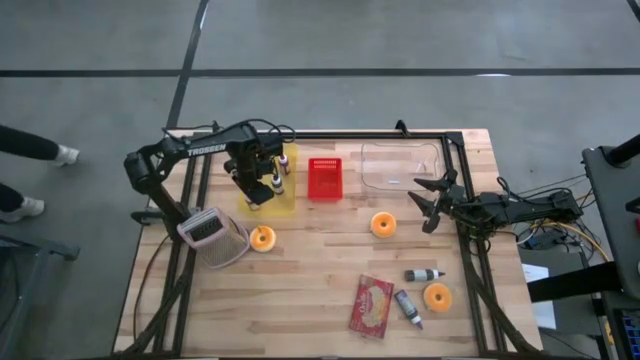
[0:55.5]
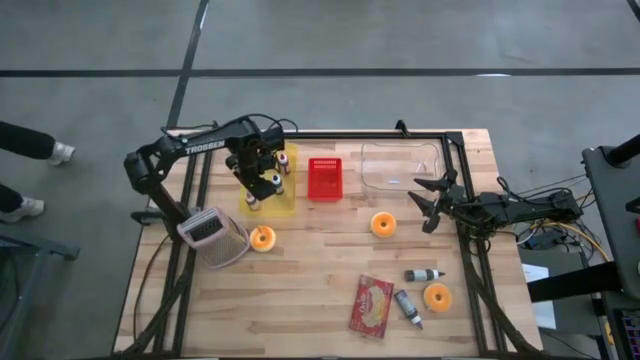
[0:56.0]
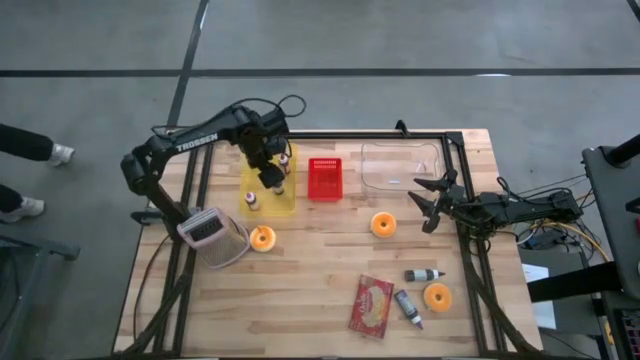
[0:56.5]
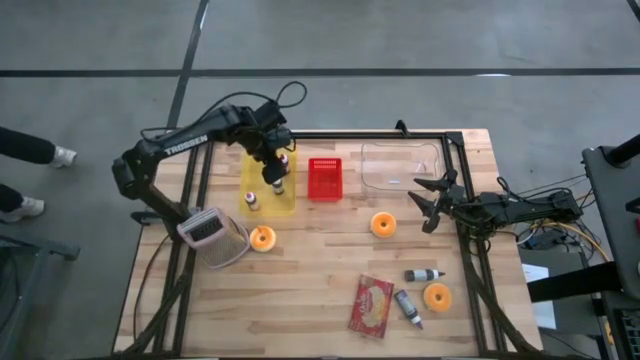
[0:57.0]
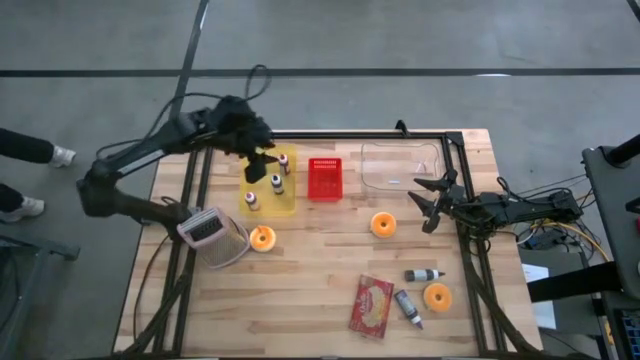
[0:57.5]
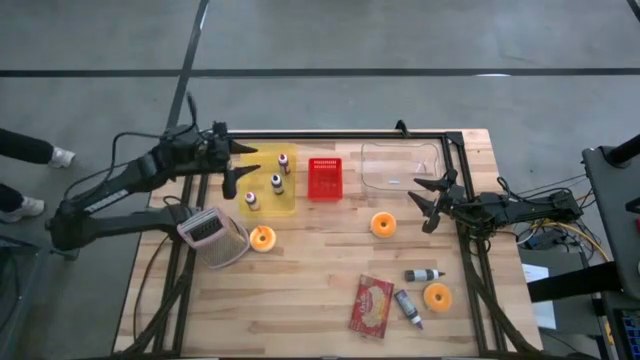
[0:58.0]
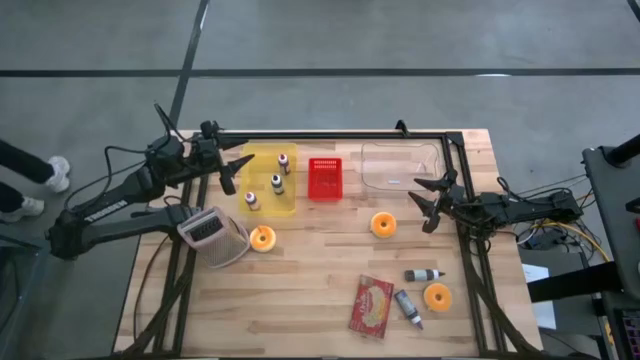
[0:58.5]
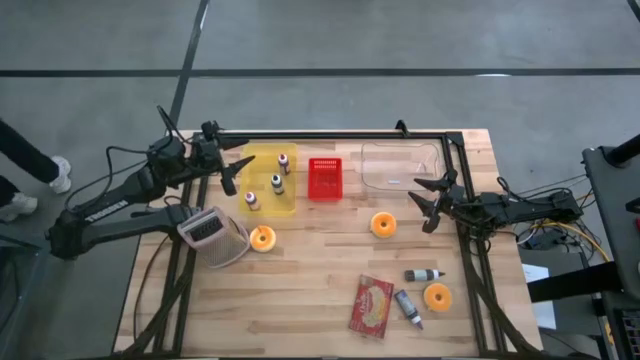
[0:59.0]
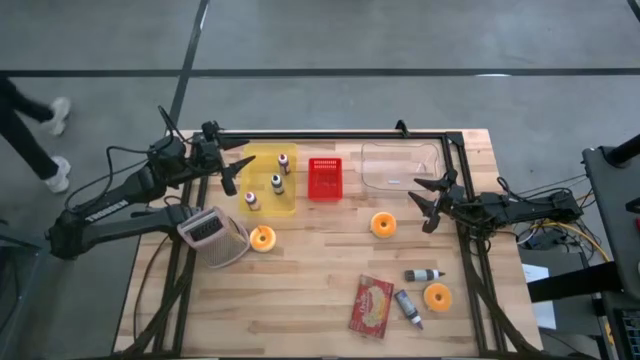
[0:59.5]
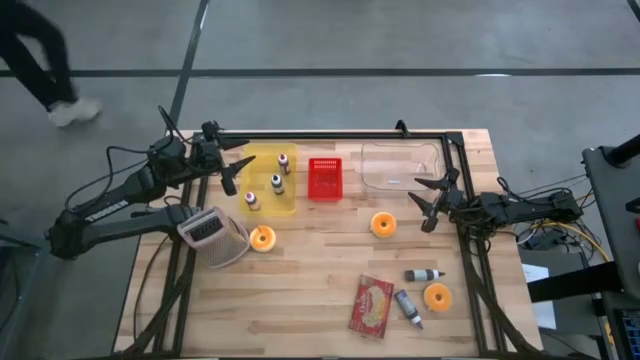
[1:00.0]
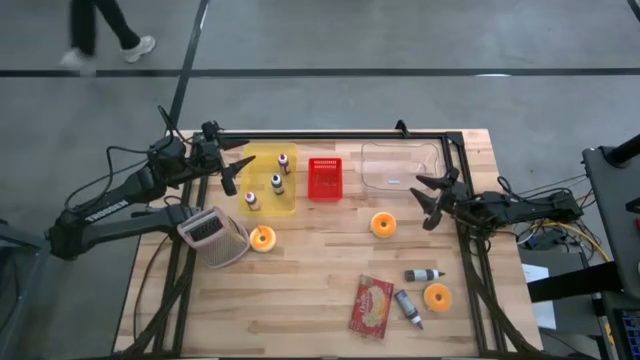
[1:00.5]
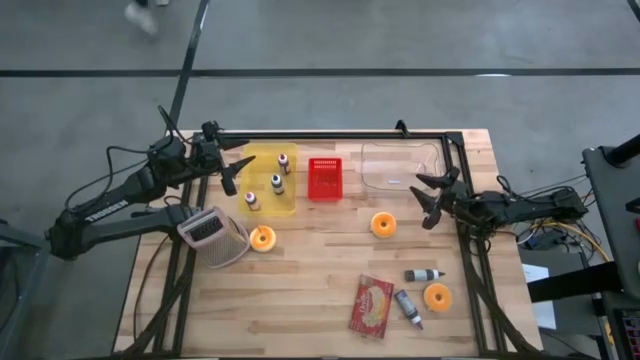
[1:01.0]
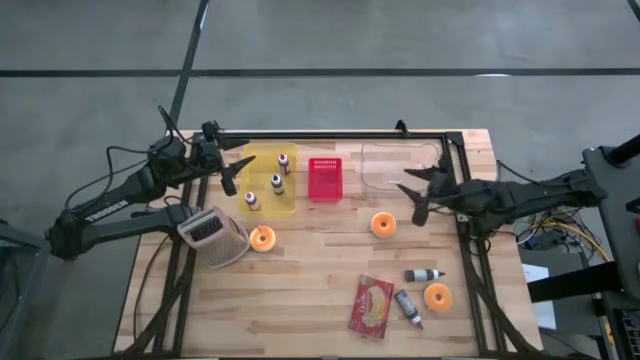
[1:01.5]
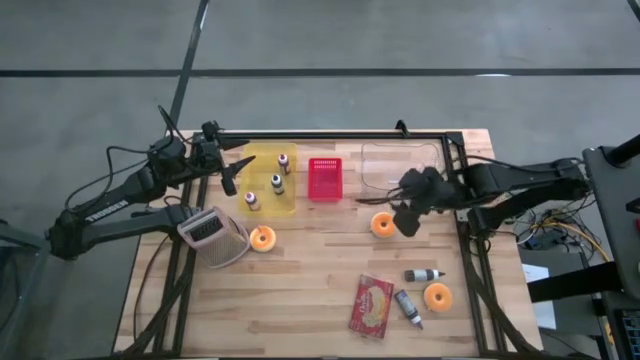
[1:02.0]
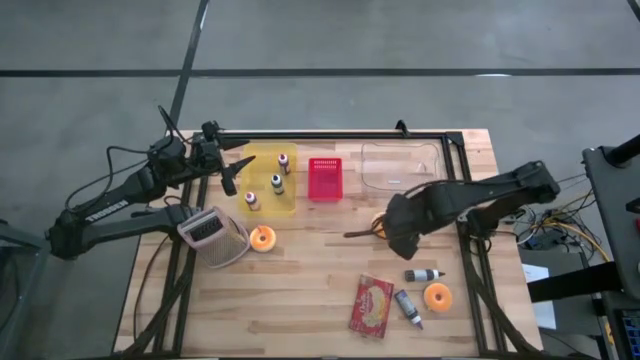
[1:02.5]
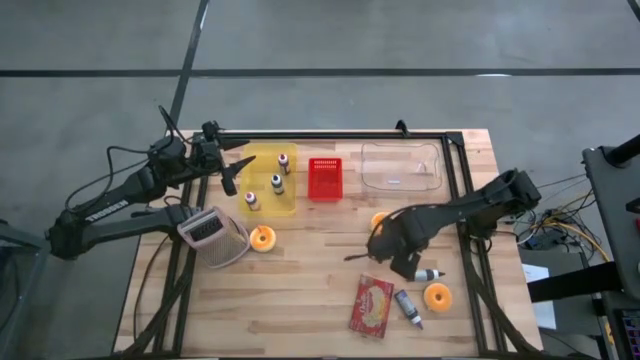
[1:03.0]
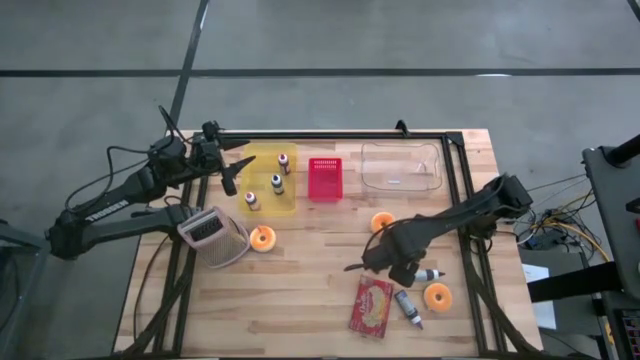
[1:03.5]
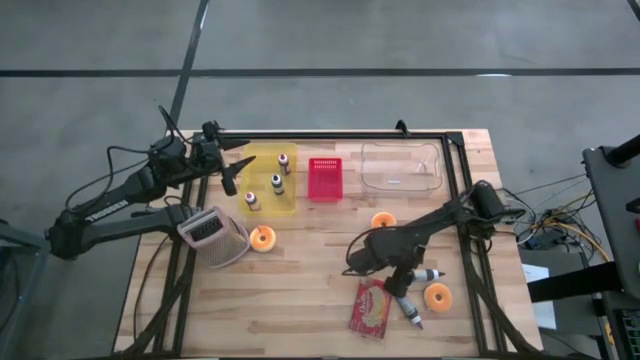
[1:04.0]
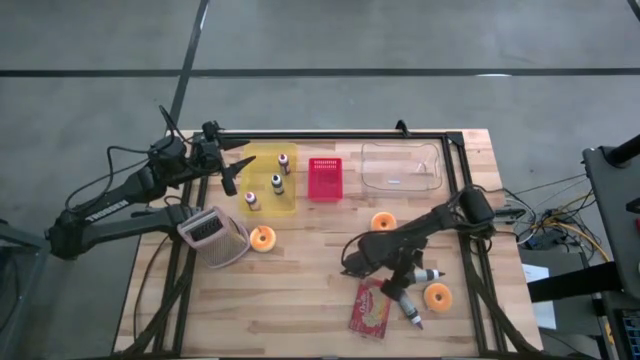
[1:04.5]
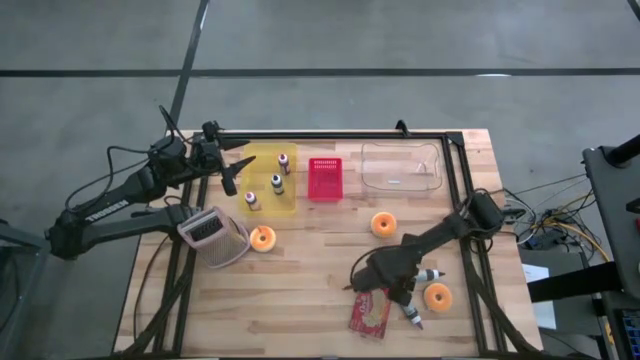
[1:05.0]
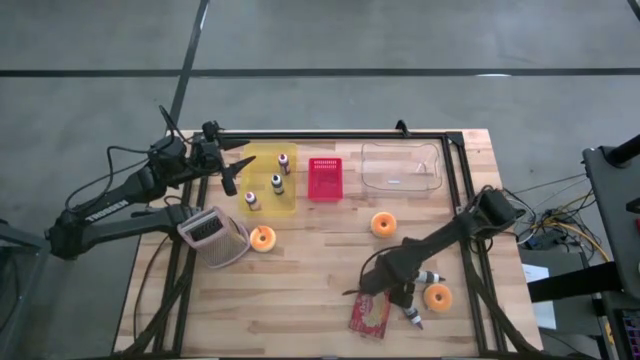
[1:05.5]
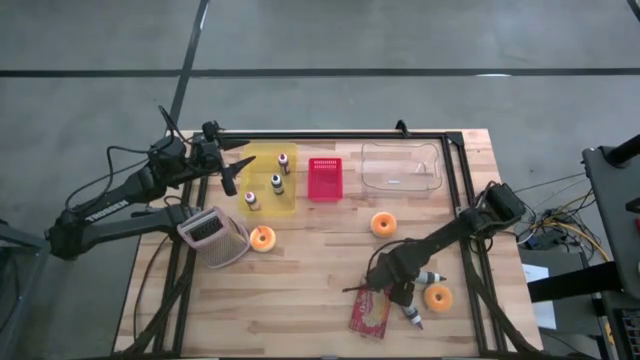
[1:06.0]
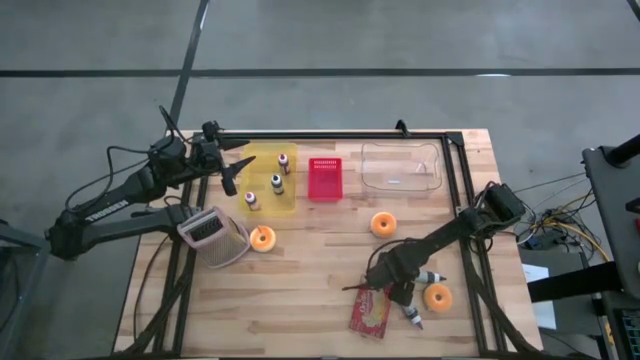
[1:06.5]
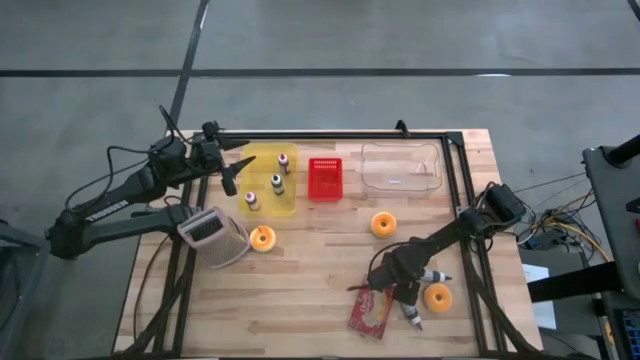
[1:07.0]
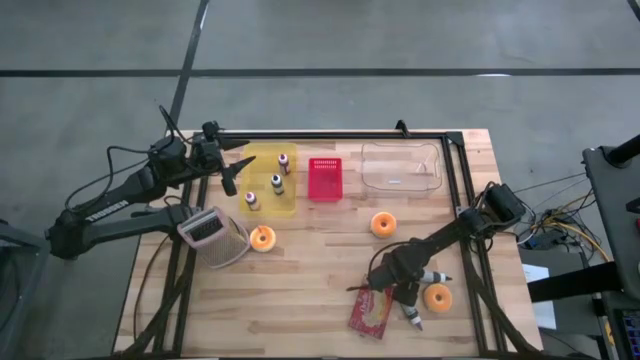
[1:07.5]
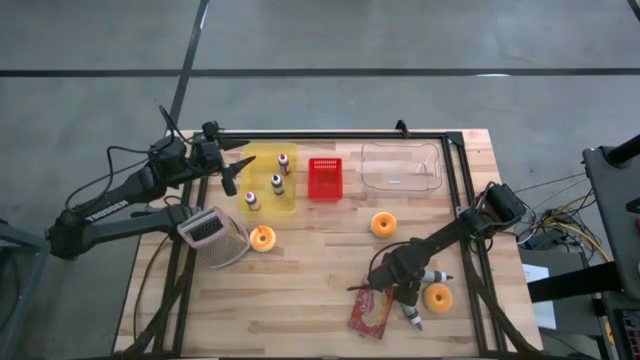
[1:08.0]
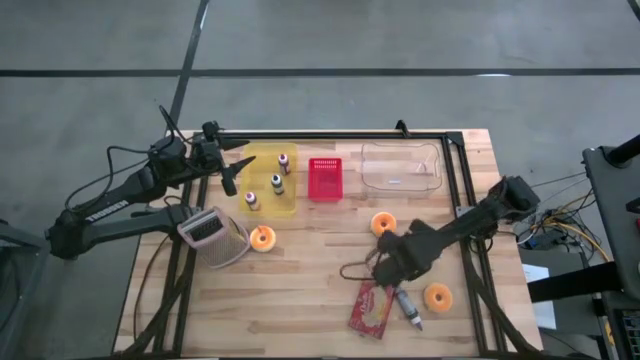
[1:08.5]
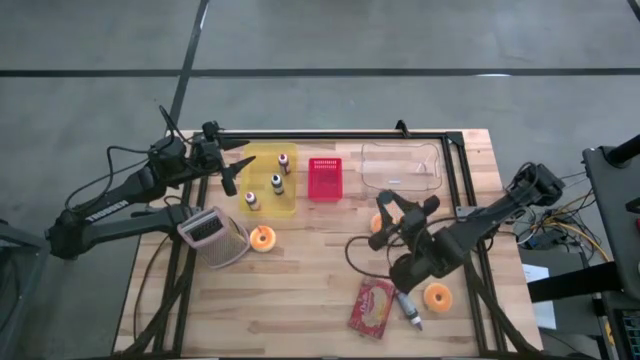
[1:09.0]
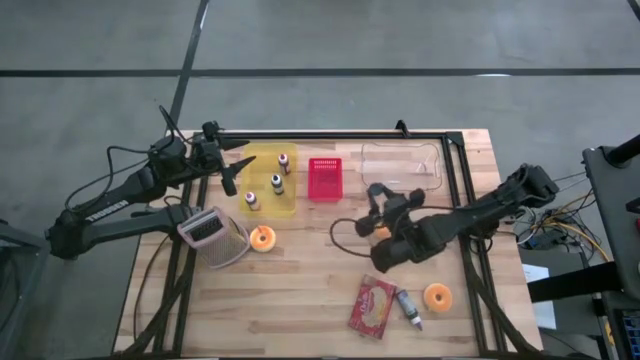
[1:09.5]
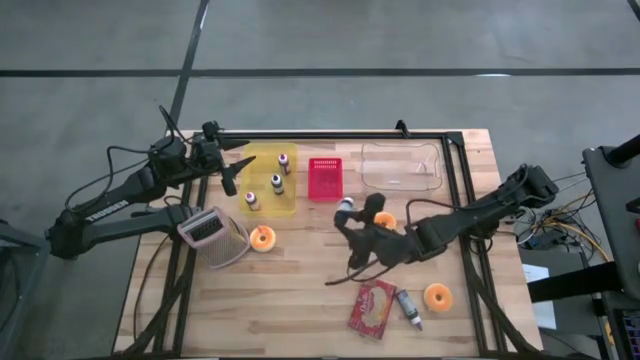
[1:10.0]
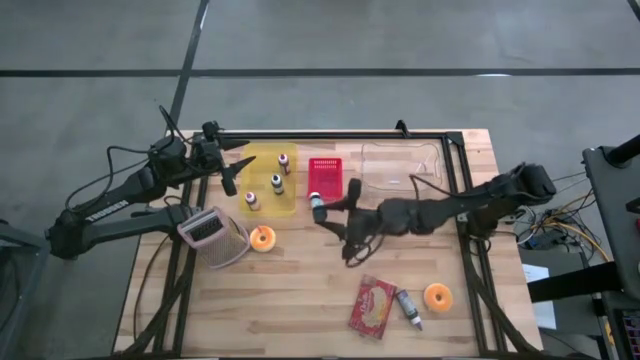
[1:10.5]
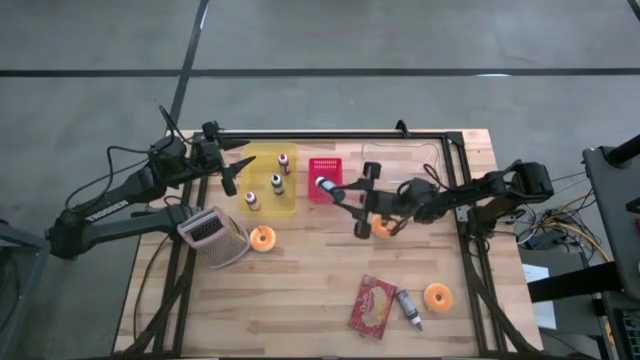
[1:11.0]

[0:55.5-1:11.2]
Task: Pick & Place Food Item
Put the black food coloring bottle into the yellow bin

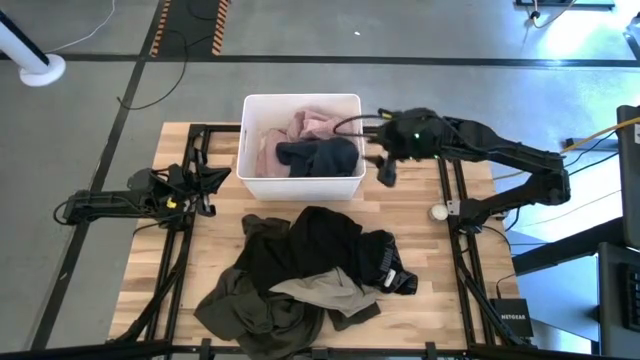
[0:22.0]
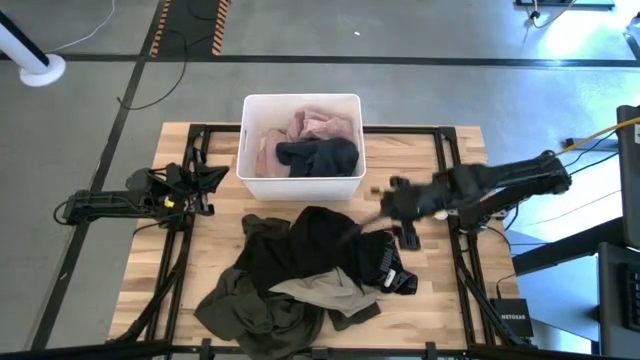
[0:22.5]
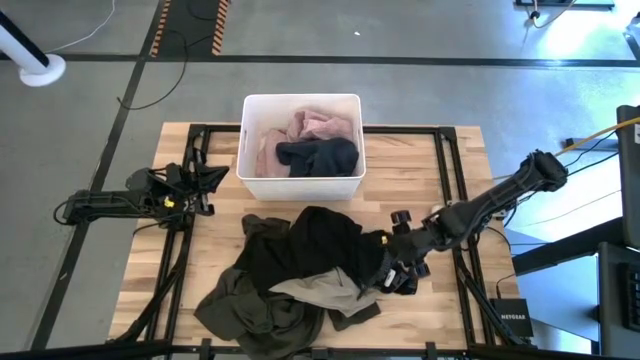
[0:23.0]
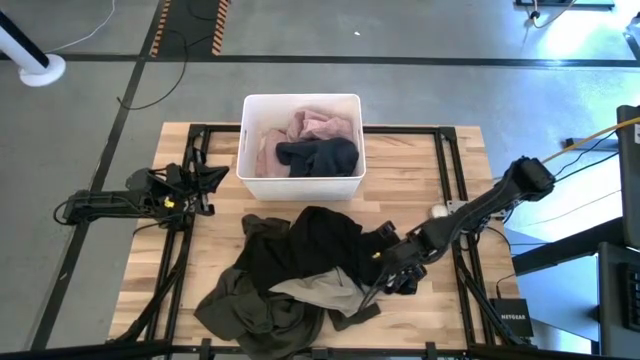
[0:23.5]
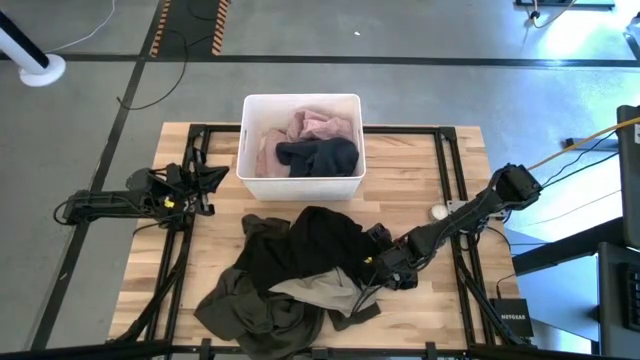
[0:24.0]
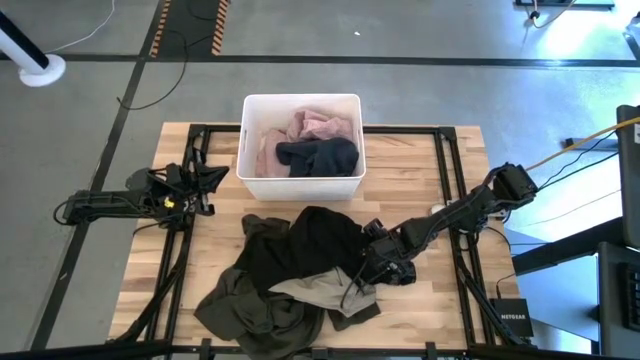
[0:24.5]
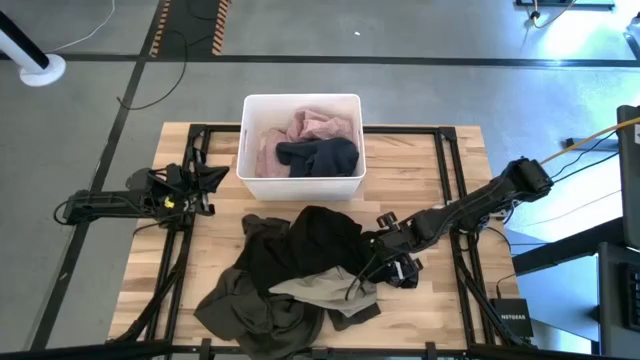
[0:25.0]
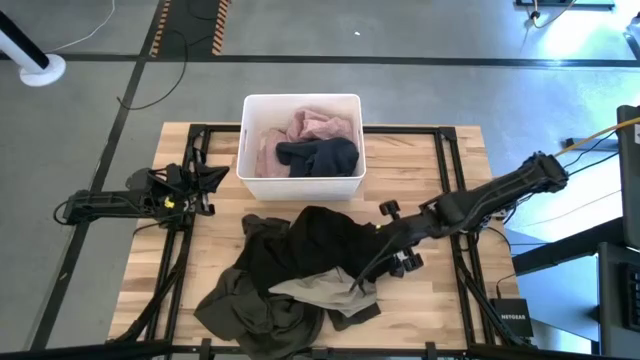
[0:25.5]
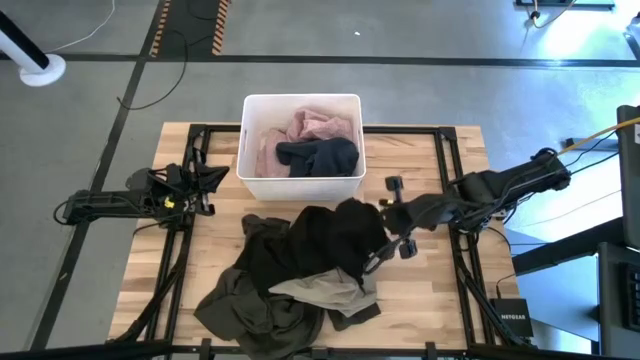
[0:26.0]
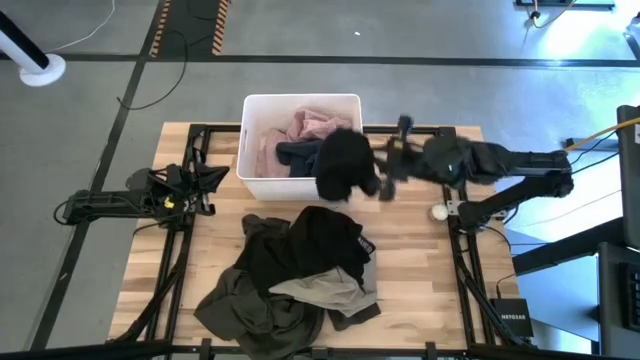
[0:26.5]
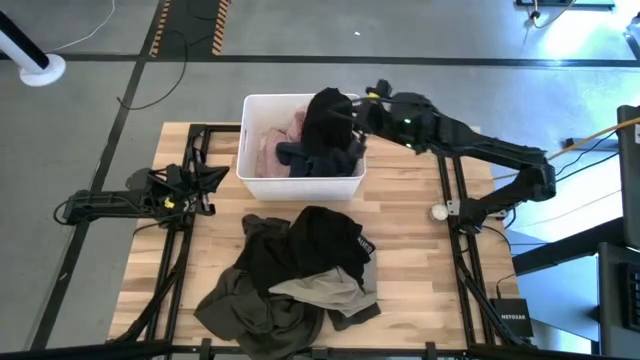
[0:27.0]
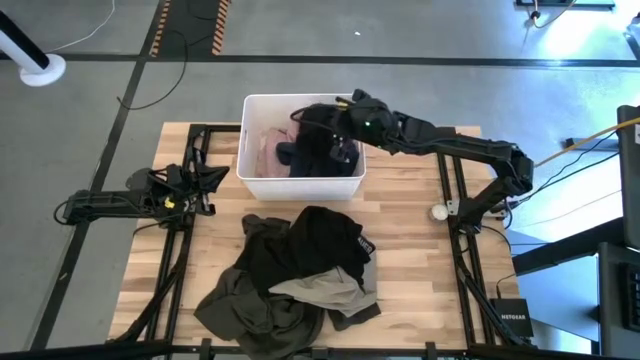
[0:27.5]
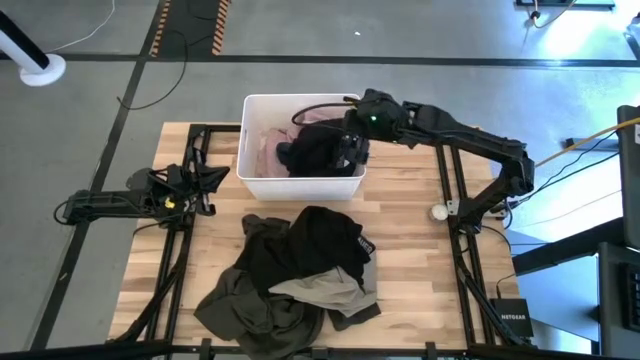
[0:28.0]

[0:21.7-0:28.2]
Task: Sort clothes
Put the black boxer into the white laundry organizer
